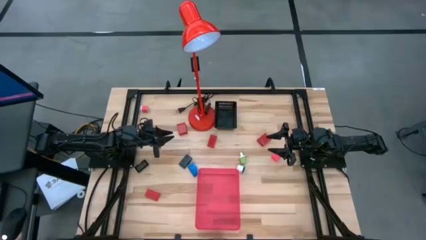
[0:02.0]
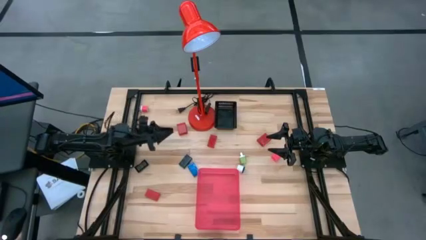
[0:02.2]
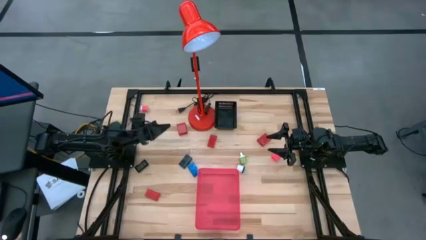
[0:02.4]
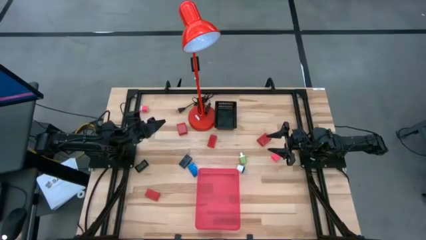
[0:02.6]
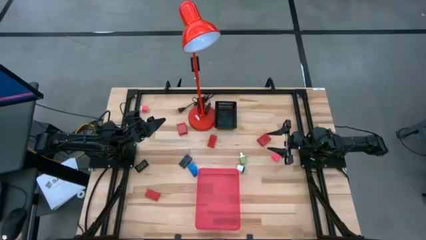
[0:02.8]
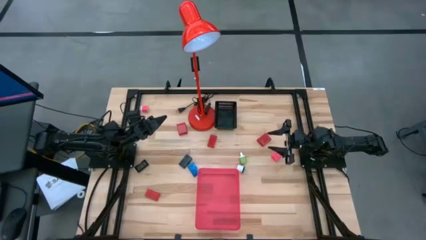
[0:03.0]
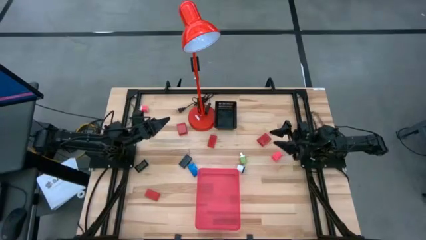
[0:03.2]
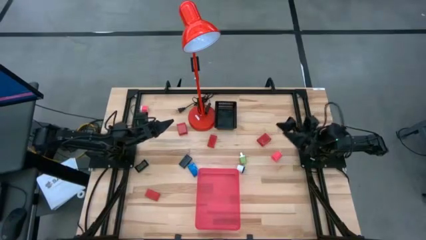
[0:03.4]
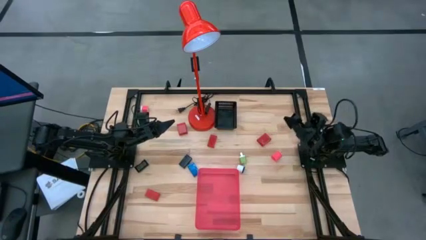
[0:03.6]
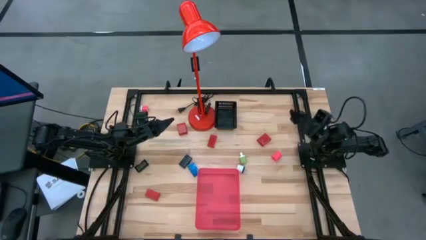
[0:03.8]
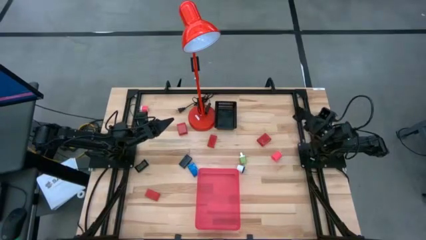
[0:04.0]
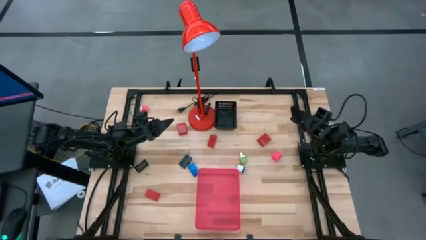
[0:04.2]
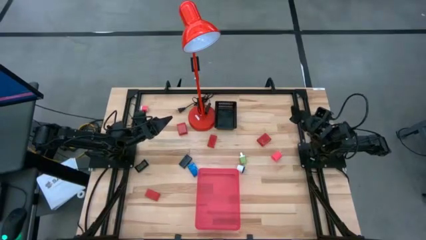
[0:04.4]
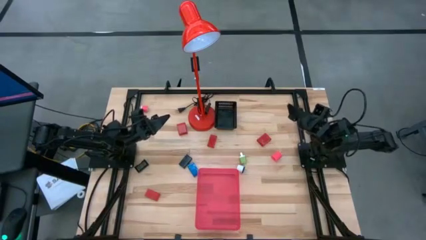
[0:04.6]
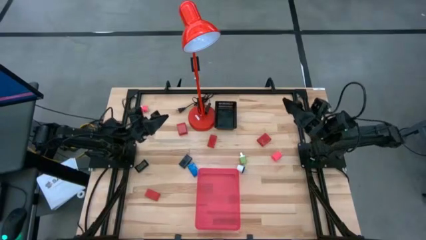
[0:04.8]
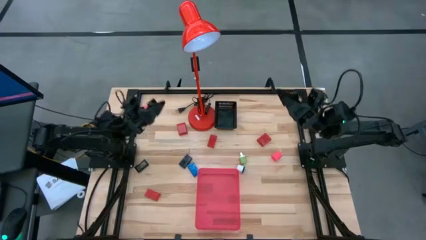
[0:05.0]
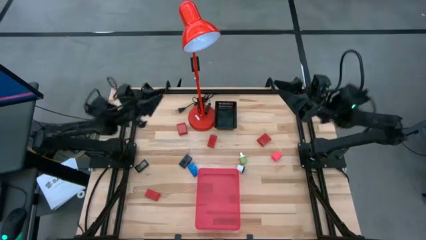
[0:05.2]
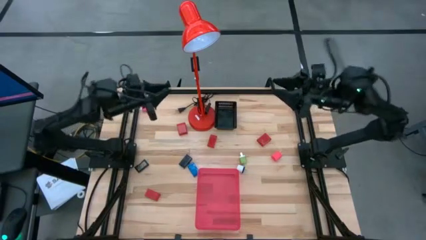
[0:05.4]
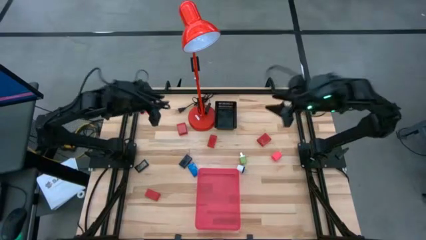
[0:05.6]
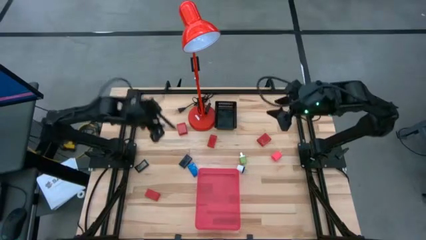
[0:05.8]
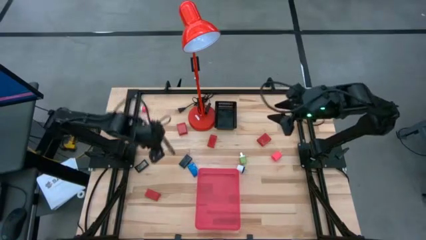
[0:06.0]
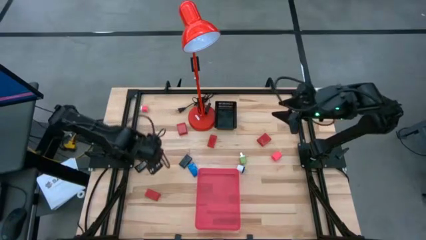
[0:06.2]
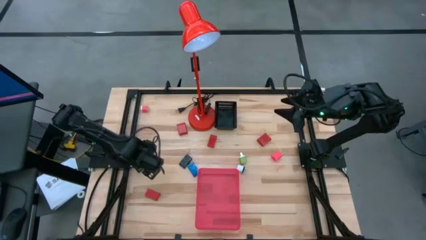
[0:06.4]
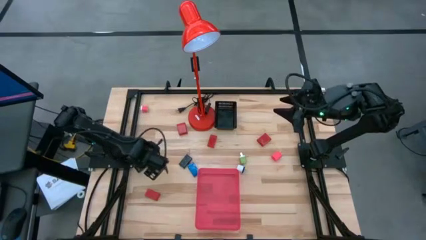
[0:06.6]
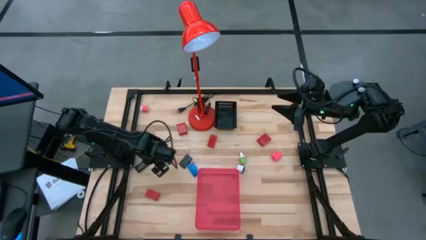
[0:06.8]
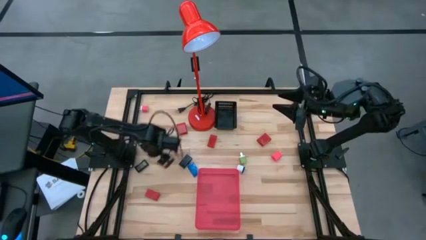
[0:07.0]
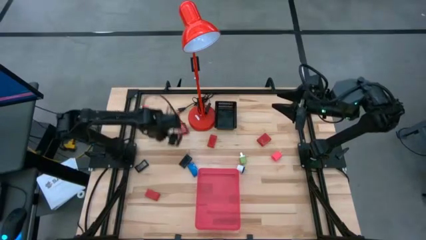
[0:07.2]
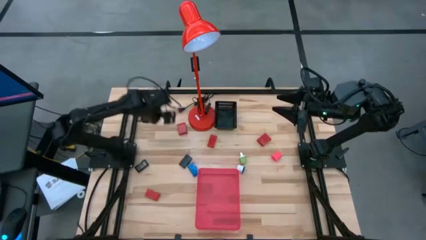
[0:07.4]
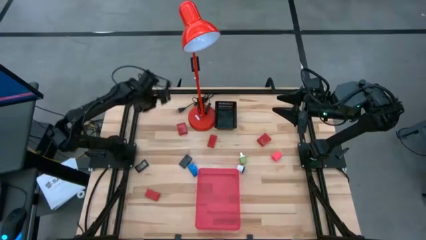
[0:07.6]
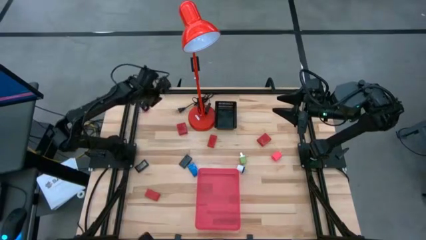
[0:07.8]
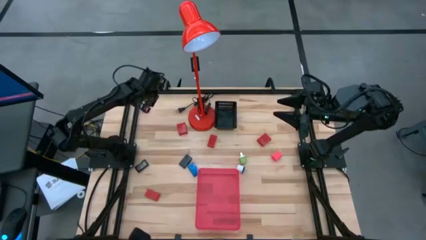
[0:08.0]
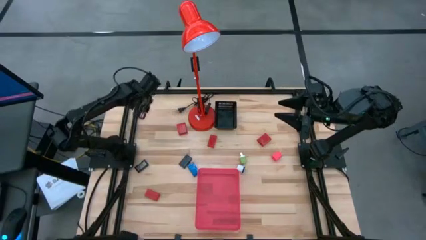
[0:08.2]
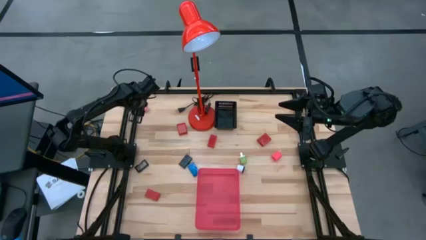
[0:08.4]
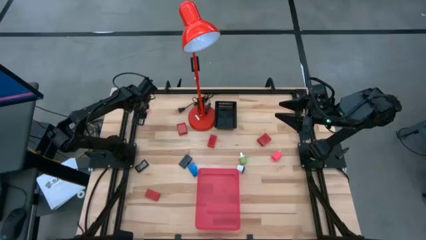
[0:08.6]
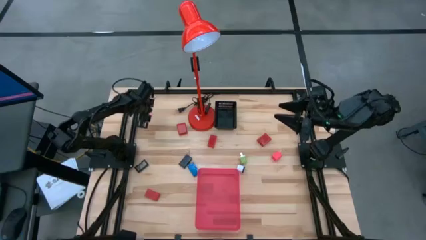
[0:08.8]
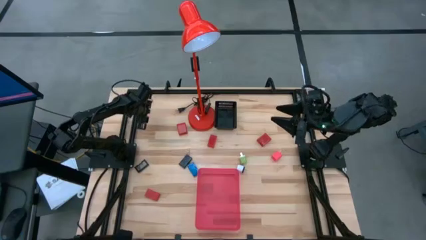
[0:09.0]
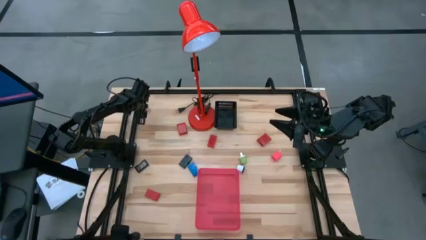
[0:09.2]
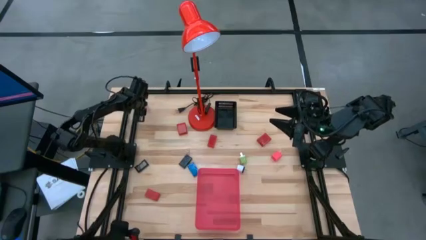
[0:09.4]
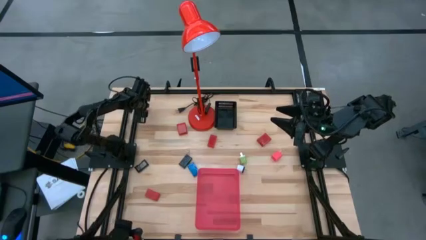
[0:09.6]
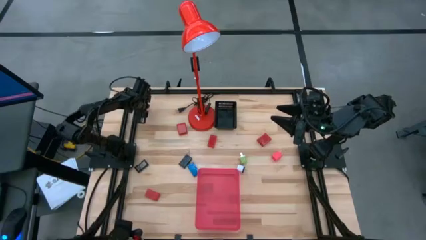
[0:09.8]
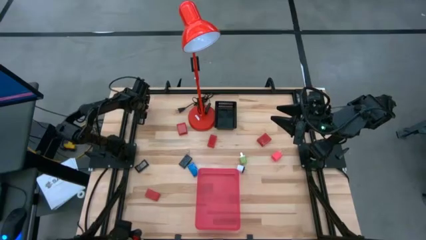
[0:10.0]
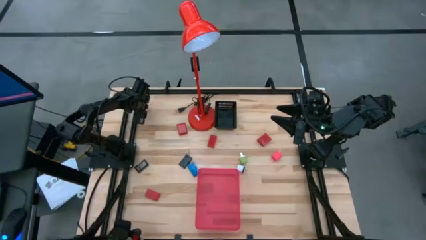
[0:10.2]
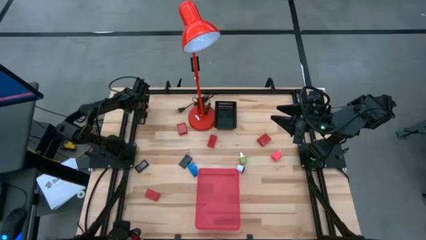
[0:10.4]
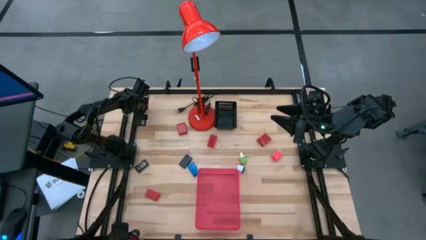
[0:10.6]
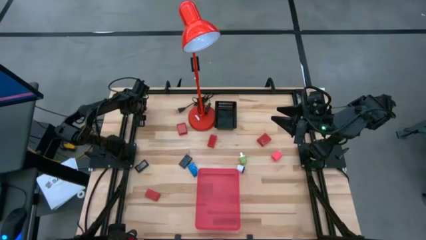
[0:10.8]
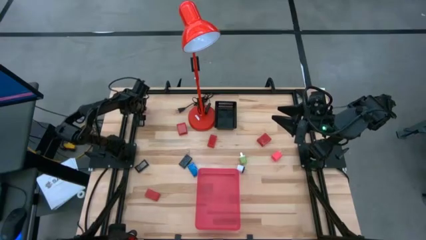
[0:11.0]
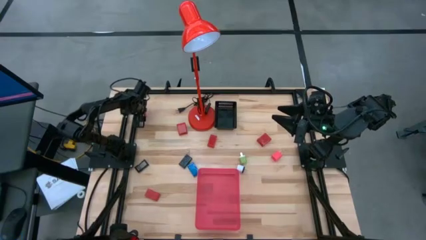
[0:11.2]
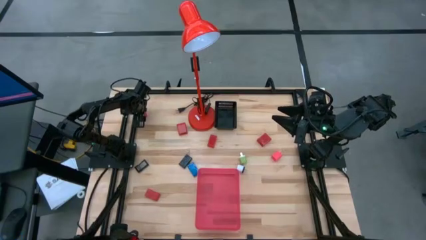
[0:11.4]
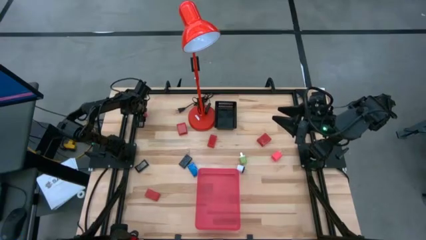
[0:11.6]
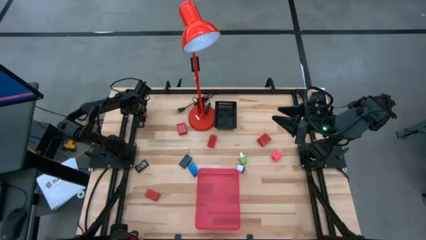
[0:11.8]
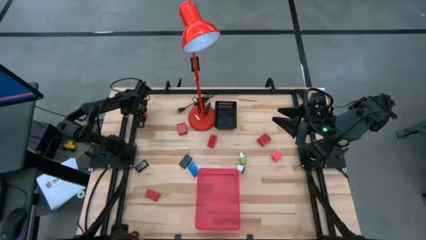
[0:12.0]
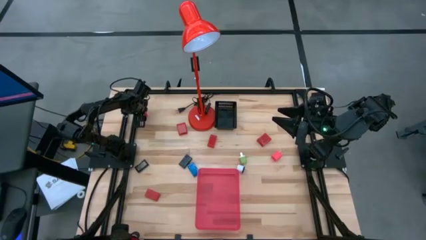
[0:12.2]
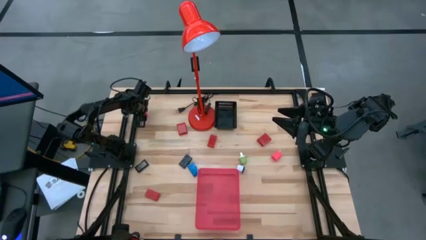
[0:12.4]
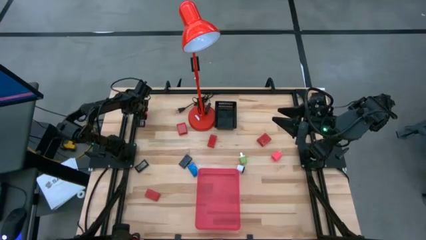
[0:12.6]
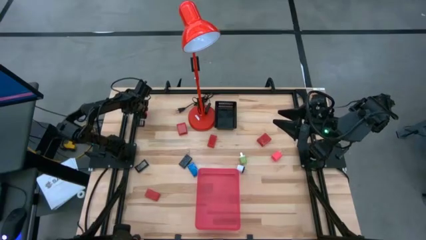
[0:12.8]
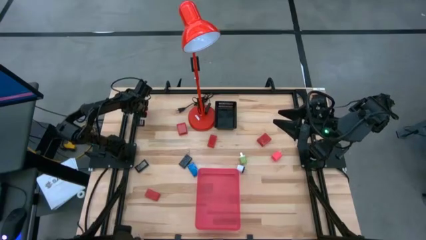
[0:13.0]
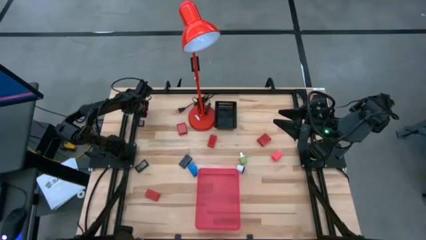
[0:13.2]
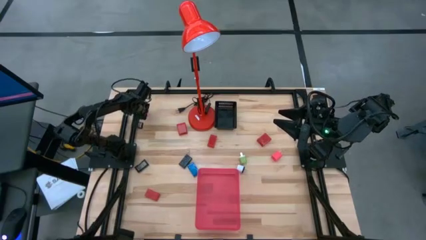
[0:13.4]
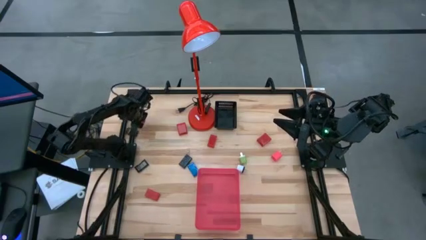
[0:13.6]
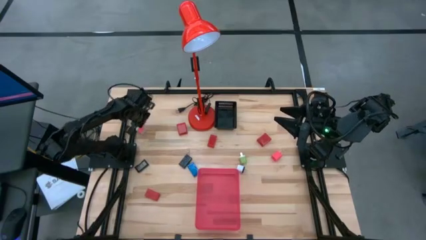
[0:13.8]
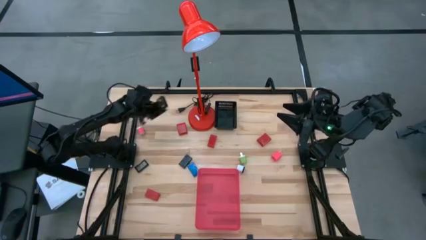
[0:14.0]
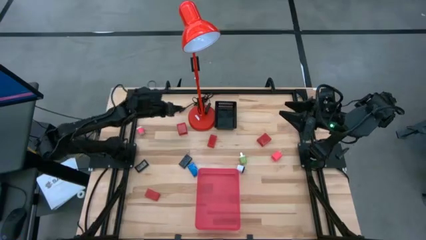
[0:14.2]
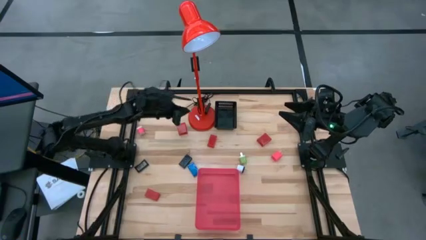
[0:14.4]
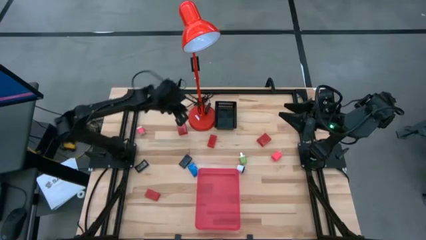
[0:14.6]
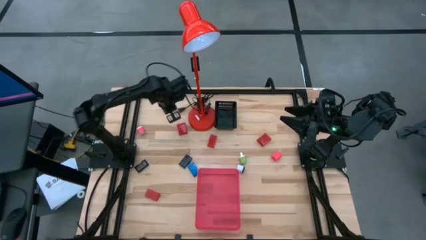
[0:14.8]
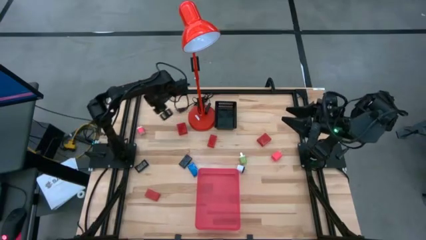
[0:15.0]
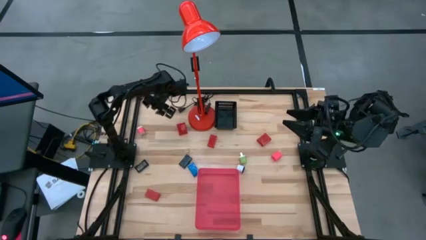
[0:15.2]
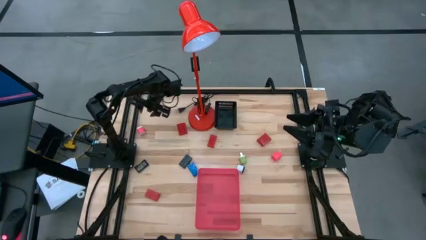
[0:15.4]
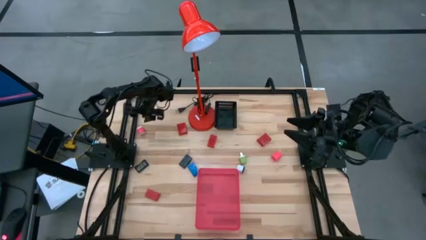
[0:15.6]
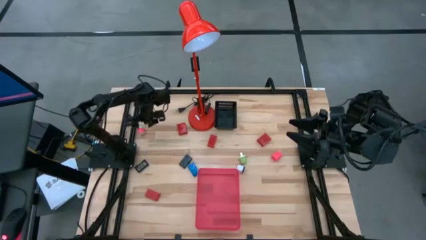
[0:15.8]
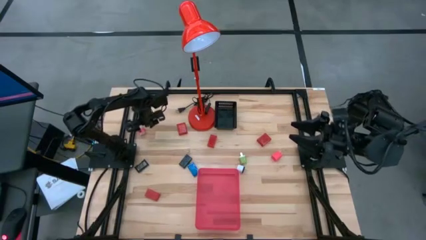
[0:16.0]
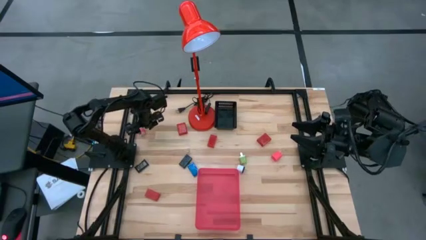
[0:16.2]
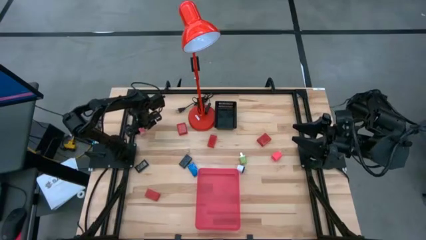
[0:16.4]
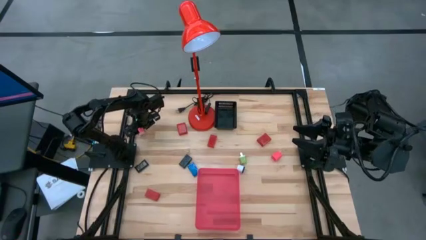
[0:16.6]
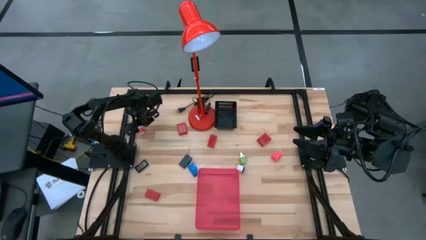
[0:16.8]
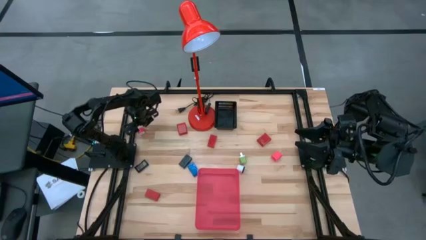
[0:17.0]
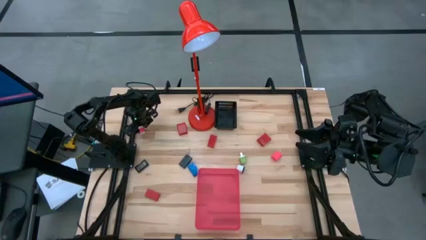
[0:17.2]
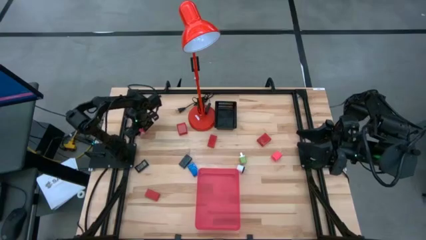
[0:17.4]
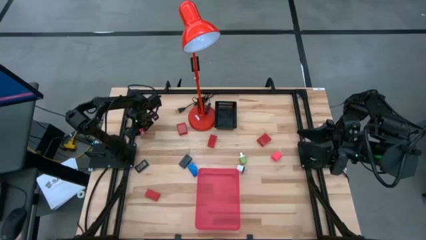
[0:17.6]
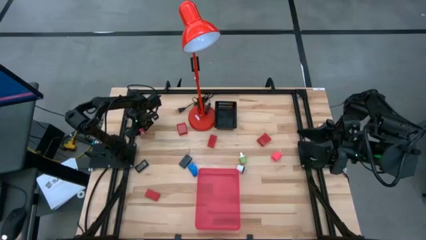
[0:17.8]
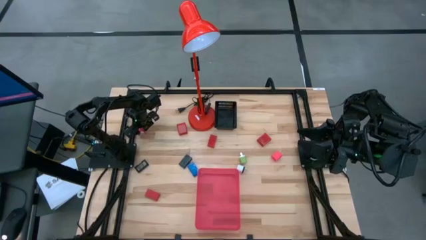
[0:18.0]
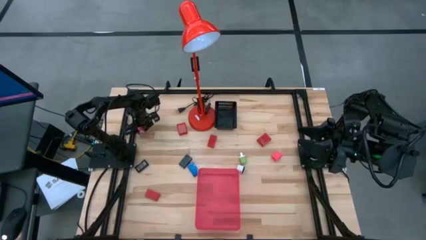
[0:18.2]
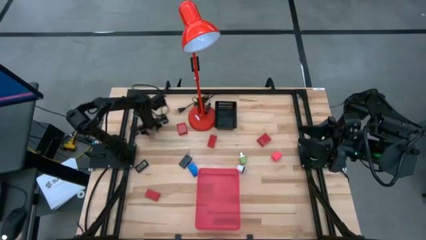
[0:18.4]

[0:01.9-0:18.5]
Task: Pick & Place Office items
Put the left pink charger adapter into the red bin
